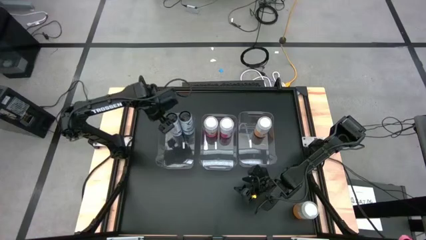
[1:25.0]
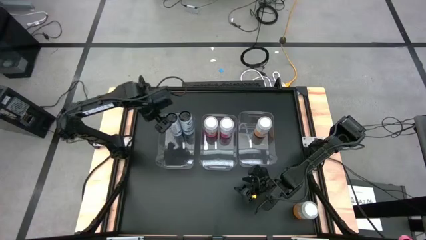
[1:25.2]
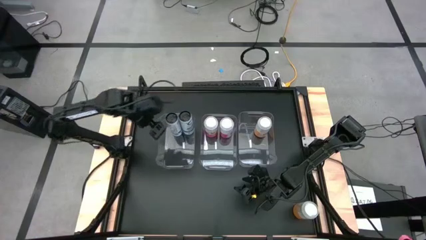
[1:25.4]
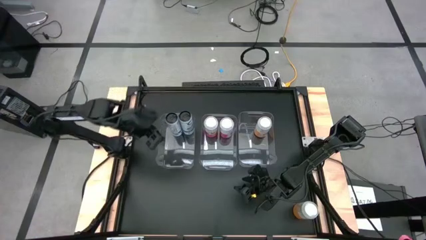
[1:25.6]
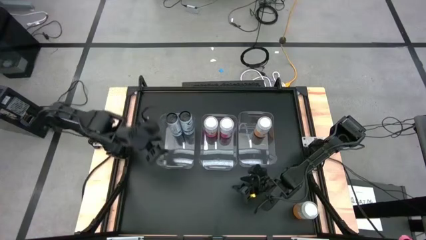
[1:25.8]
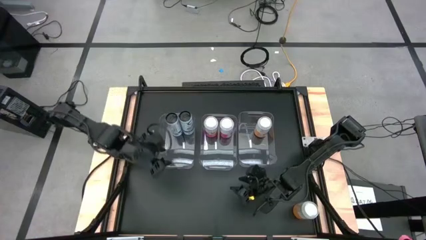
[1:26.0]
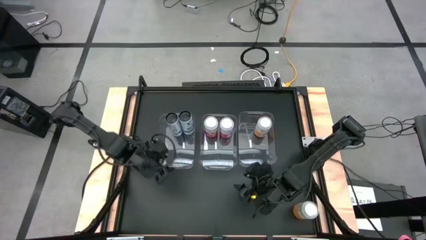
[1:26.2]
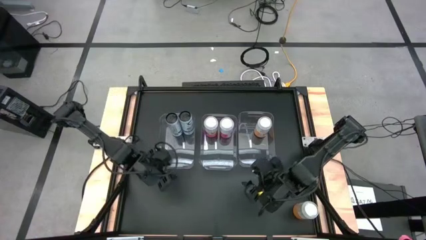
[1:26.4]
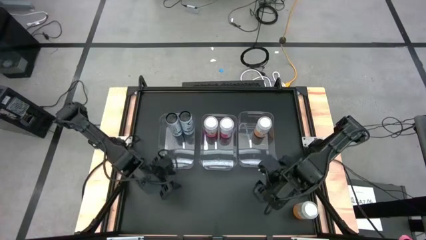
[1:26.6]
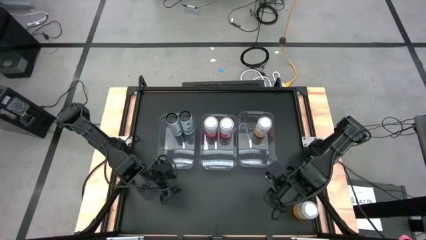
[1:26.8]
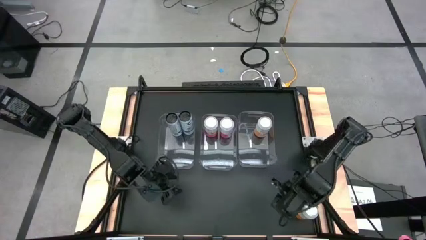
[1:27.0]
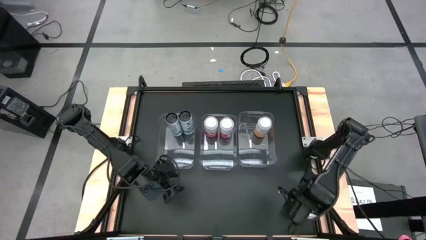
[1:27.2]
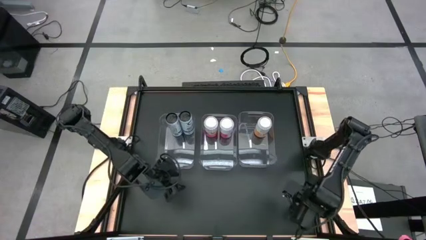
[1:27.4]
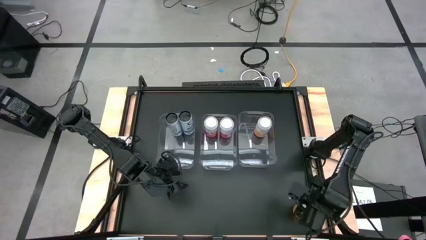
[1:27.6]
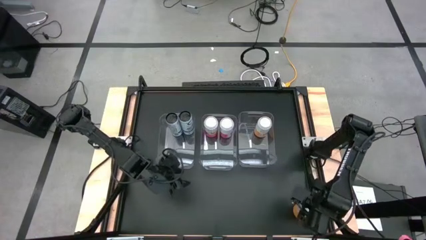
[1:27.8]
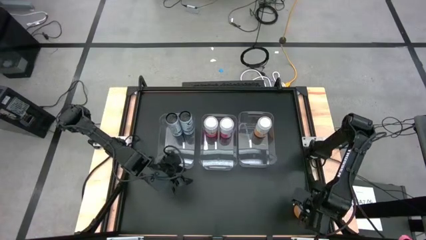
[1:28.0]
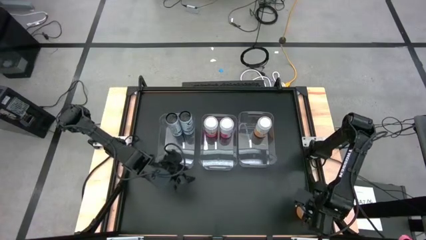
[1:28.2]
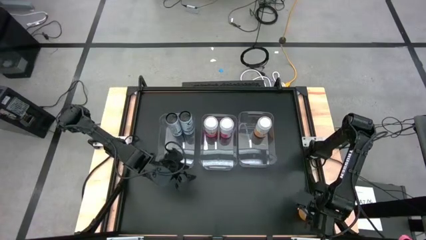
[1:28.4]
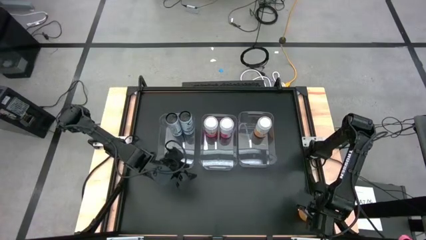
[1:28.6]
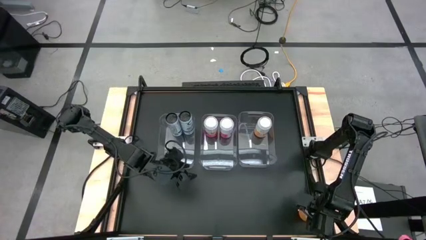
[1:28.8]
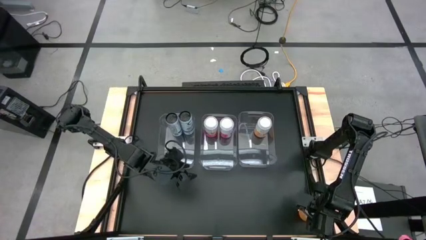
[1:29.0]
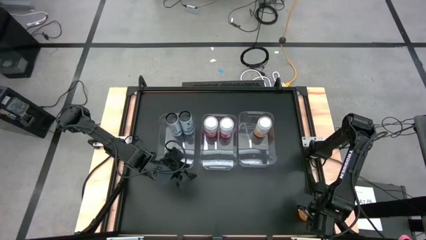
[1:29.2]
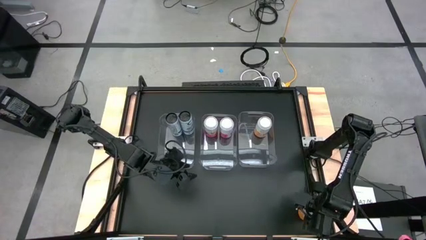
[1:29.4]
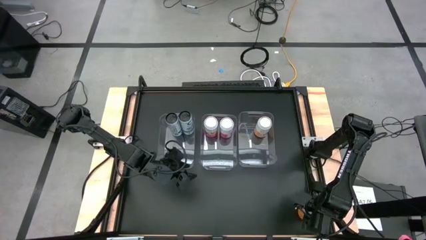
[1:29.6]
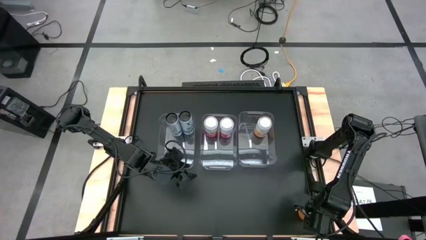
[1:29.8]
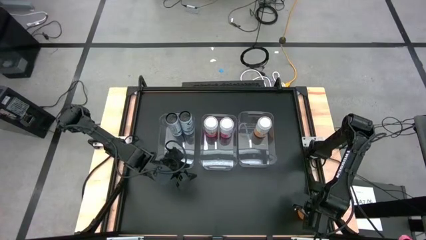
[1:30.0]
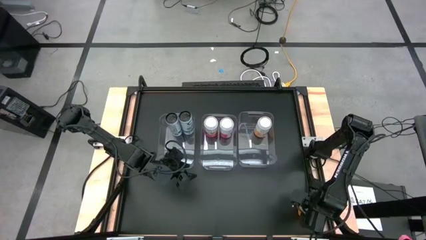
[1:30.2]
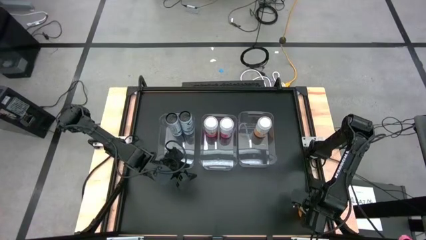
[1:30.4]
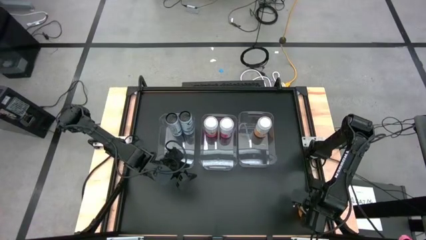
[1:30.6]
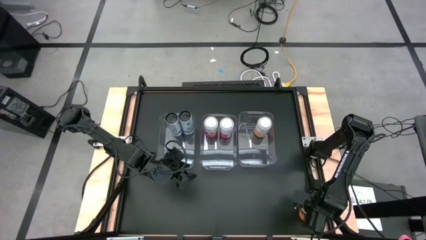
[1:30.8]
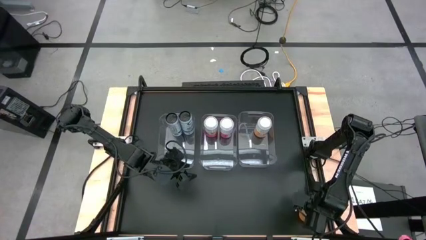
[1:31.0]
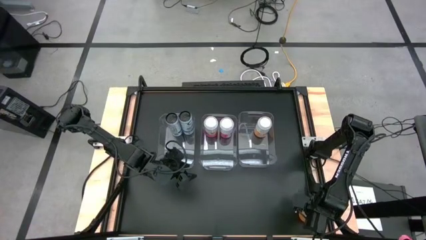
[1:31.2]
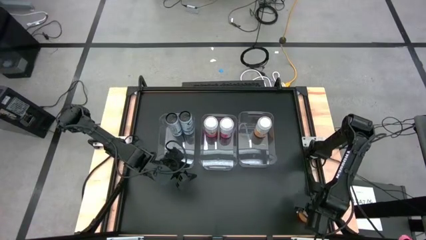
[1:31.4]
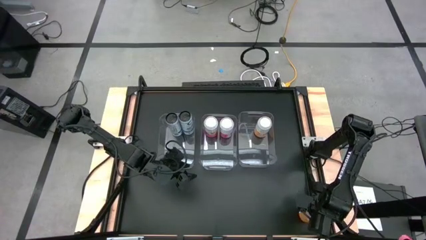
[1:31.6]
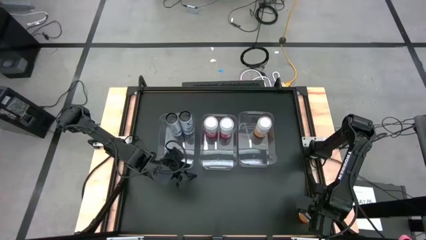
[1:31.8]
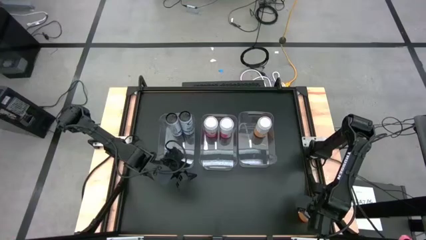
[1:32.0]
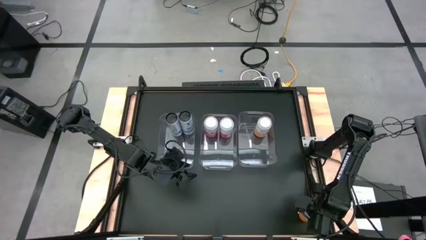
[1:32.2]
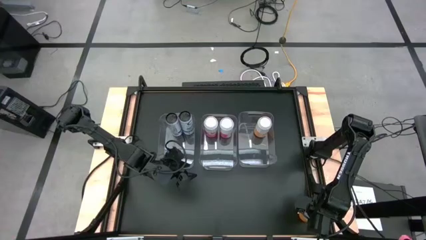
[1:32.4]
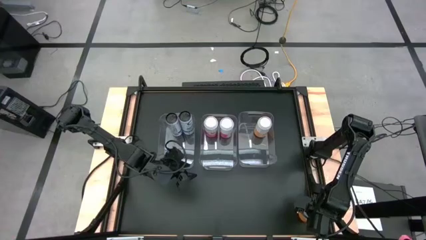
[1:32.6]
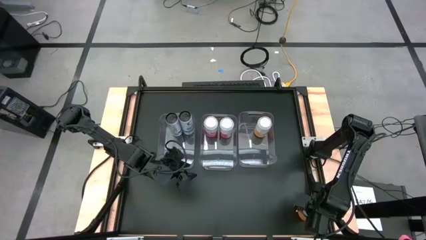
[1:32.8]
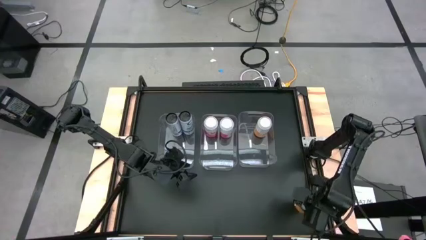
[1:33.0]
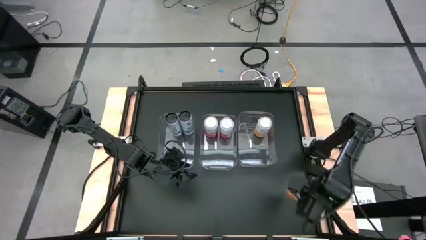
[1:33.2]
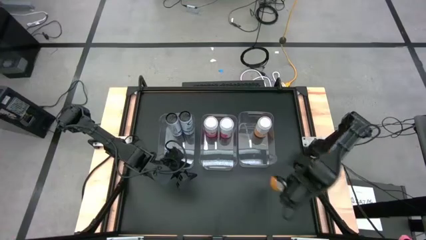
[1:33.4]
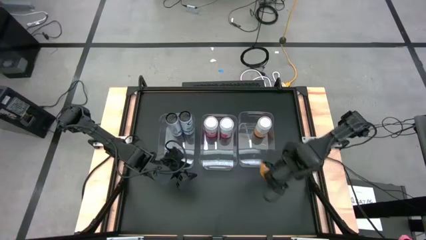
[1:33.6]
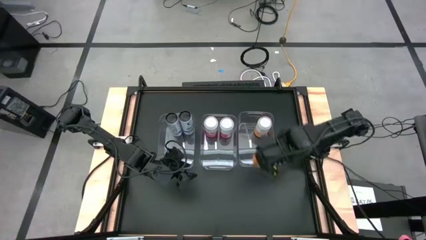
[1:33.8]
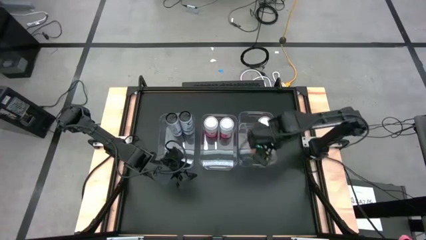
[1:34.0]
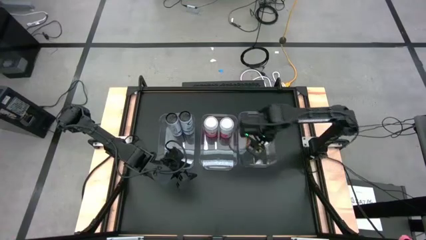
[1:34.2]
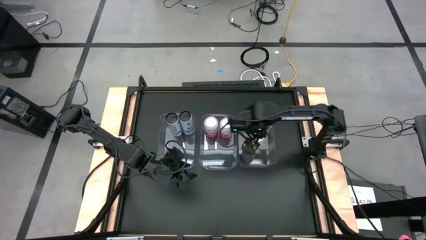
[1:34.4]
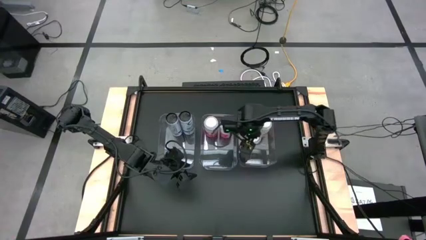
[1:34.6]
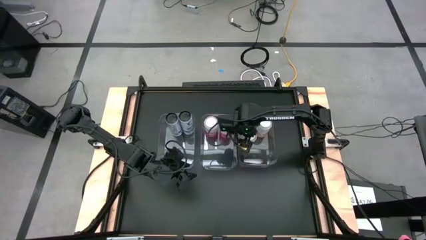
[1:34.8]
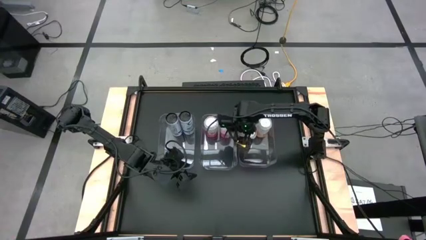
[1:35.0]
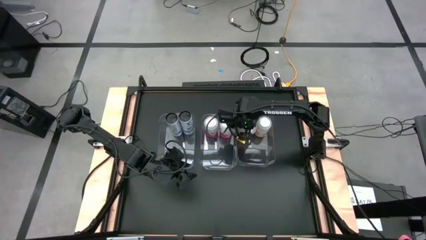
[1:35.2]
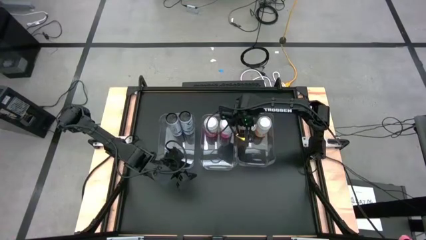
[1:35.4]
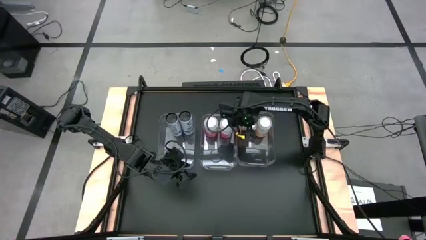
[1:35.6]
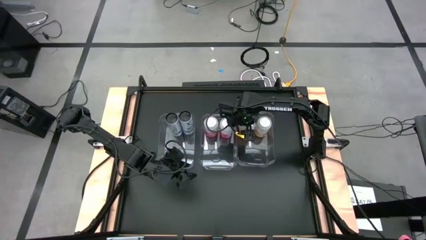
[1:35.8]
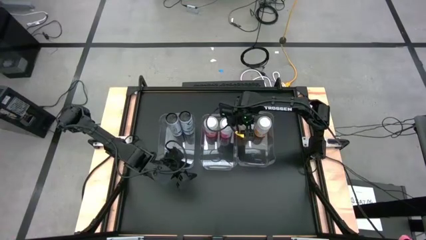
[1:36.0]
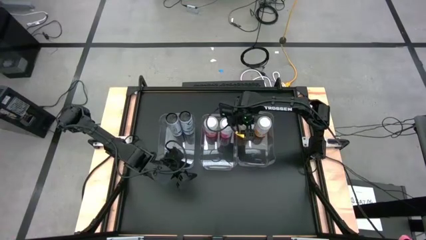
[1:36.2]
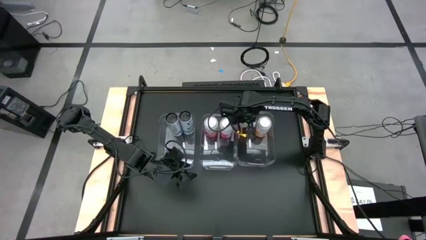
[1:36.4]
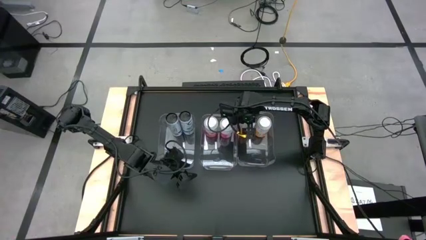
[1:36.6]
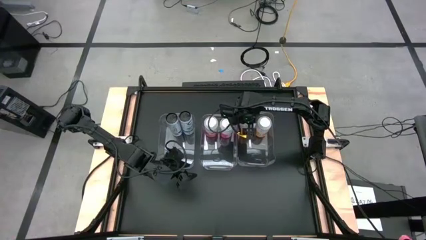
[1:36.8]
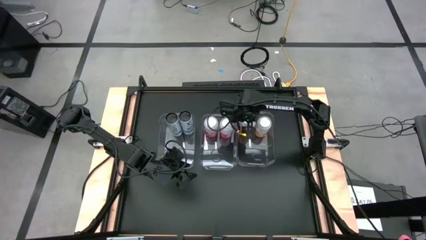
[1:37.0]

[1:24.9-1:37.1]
Task: Sort soda cans
Put the orange-white soda can into the right transparent bin

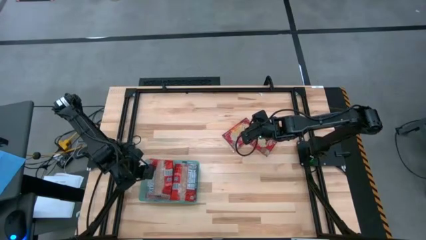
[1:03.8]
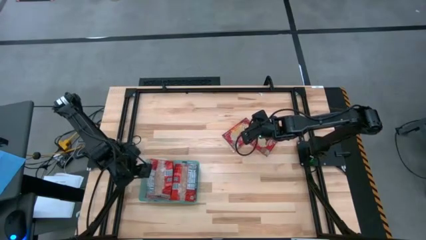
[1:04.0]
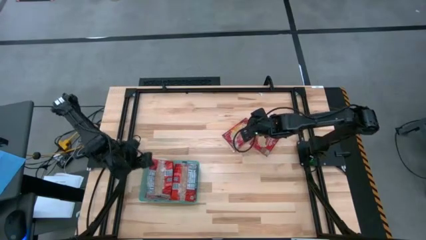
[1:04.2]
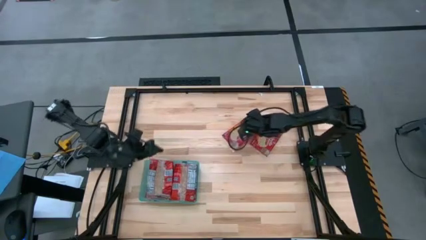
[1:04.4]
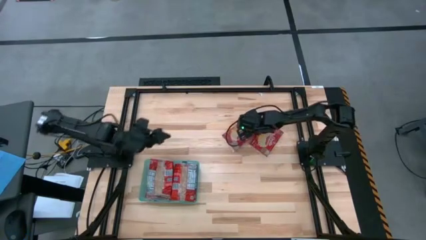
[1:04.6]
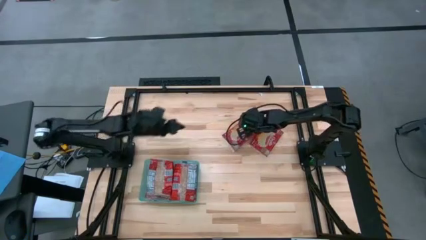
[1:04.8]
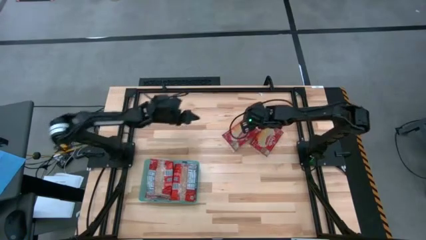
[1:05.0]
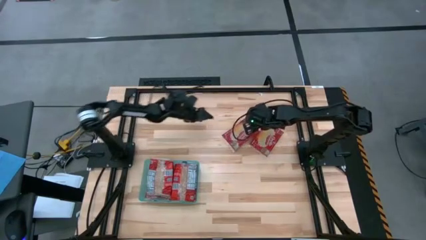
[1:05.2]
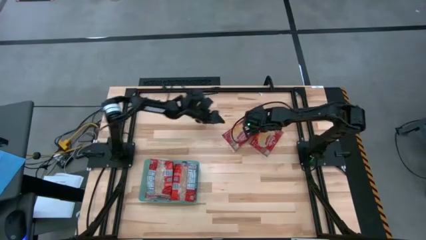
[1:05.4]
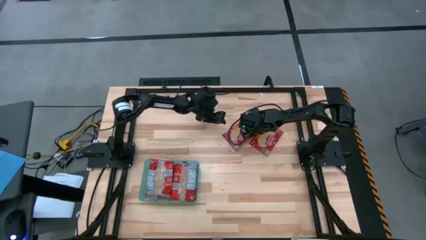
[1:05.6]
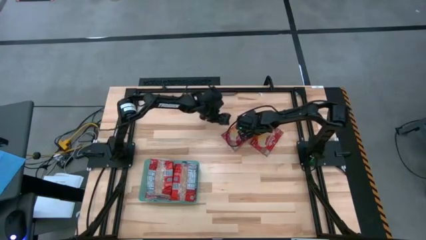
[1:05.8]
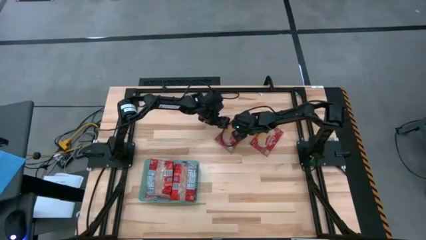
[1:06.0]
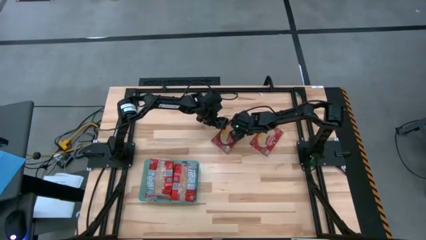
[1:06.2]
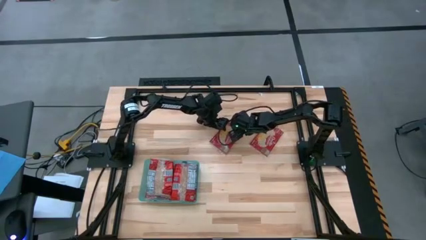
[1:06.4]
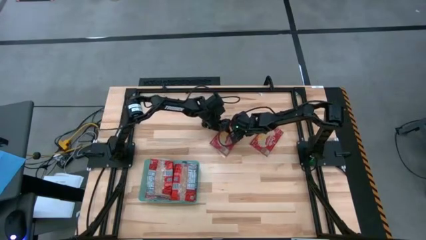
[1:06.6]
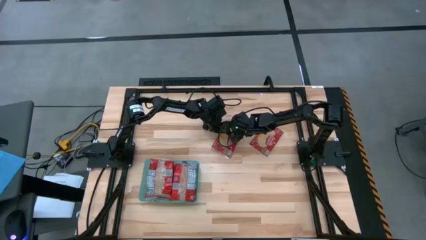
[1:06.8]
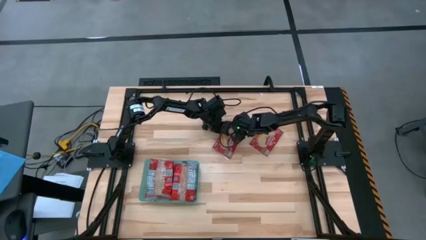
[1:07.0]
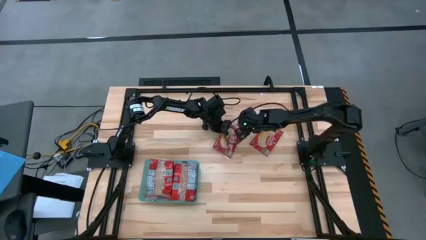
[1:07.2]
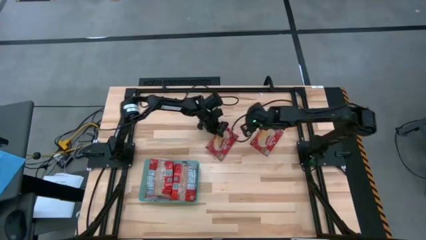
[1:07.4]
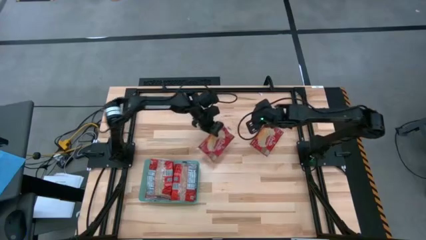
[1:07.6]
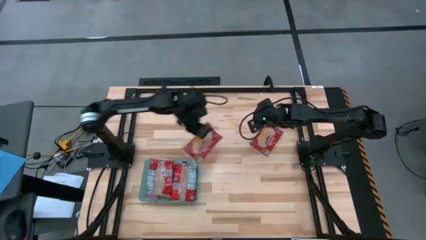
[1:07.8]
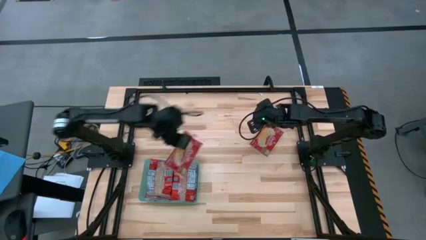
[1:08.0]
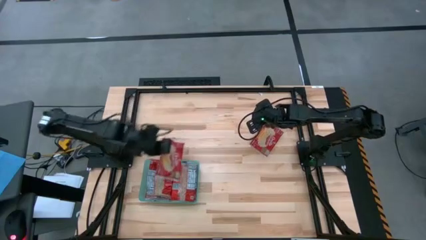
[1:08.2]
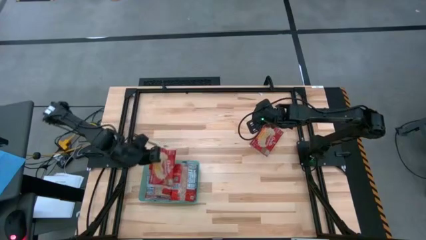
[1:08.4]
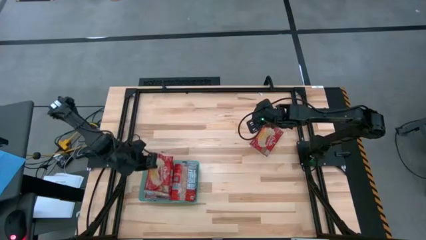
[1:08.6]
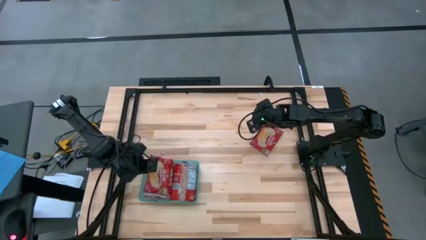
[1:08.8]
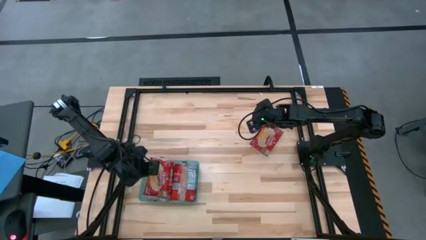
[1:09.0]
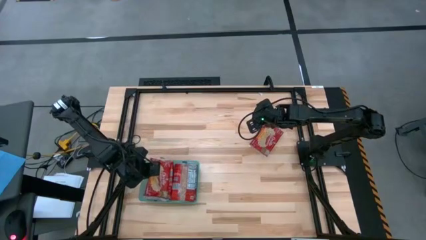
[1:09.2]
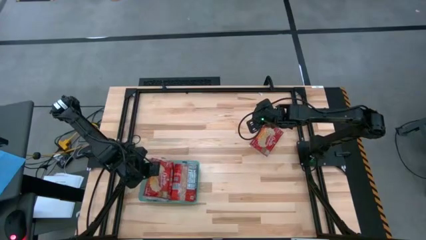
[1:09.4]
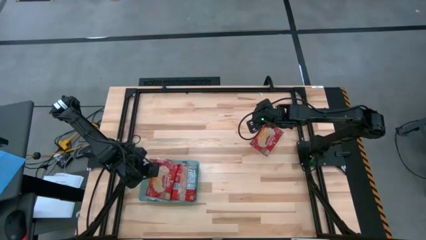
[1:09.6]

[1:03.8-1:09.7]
Task: Sort popcorn bags into baskets
Put the red popcorn pack into the green bin
